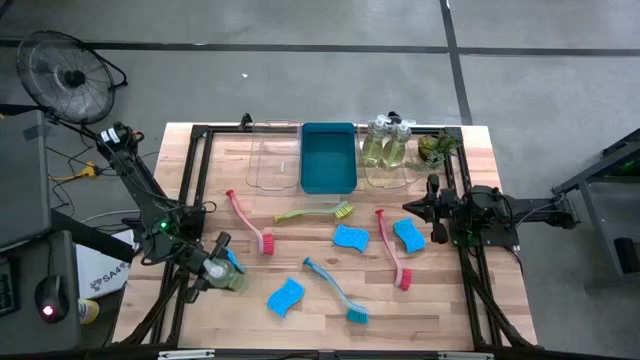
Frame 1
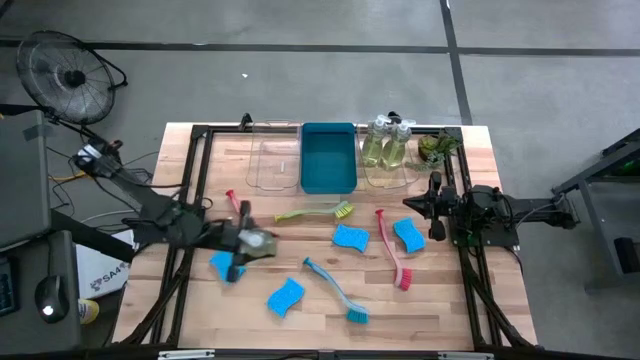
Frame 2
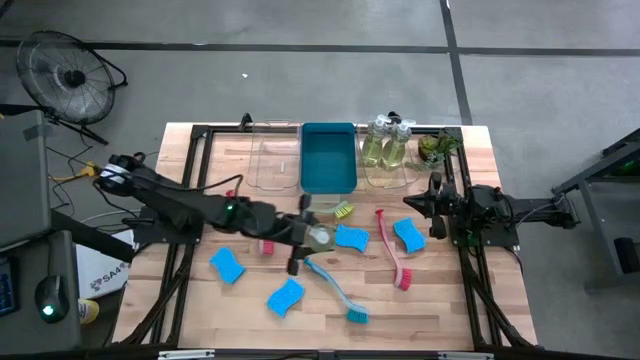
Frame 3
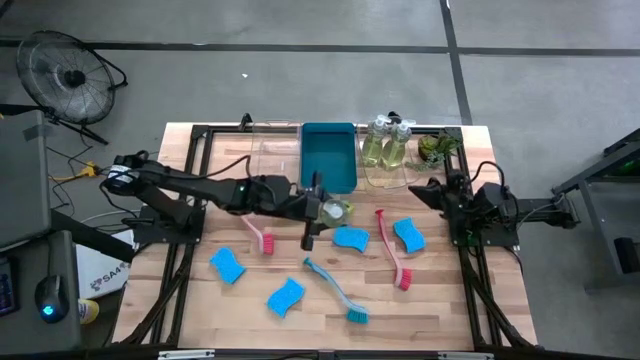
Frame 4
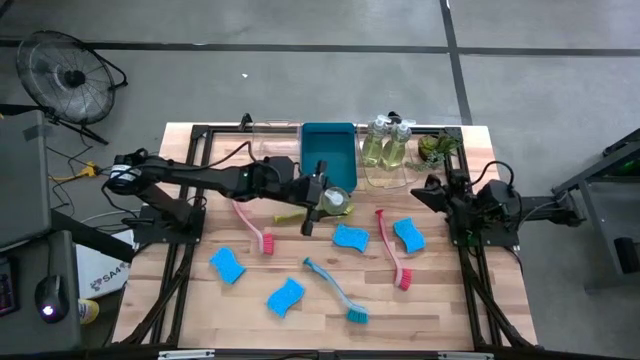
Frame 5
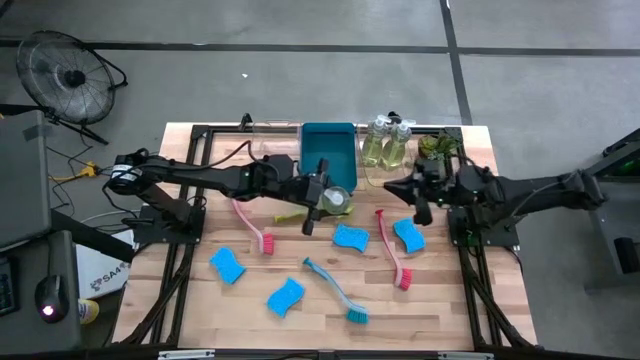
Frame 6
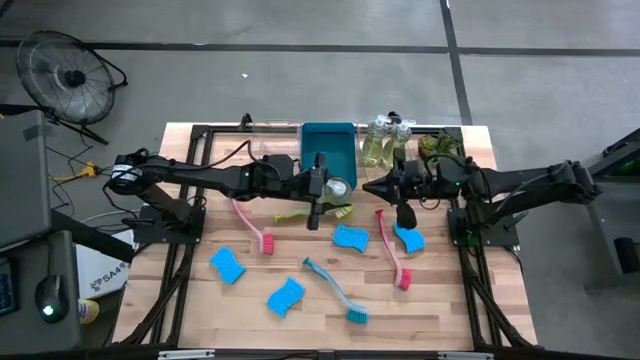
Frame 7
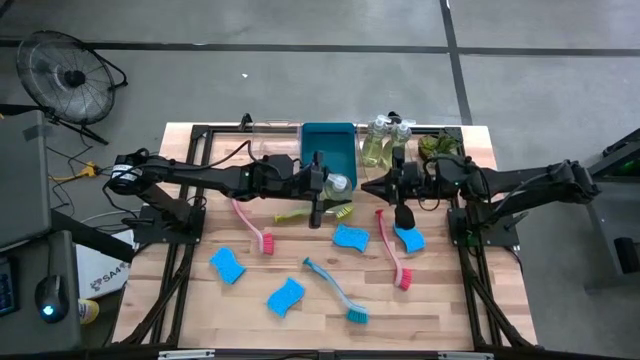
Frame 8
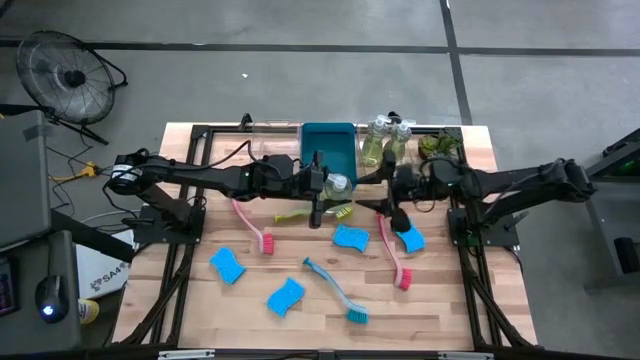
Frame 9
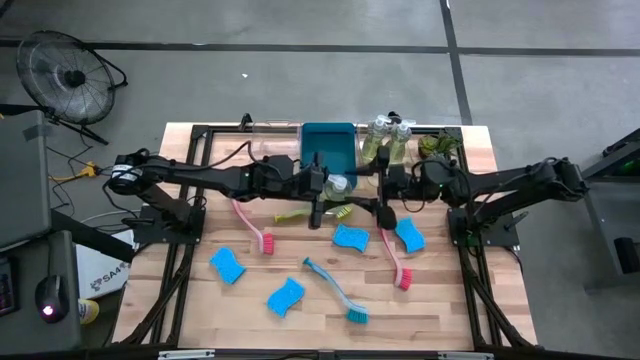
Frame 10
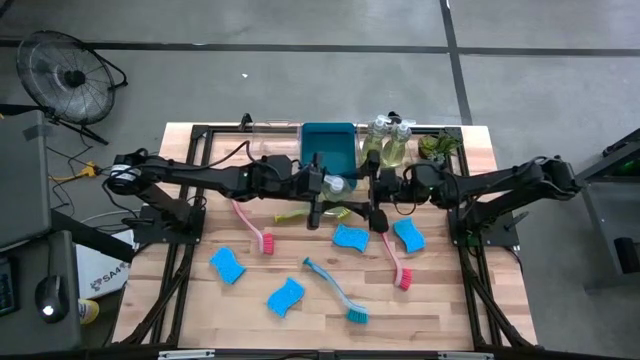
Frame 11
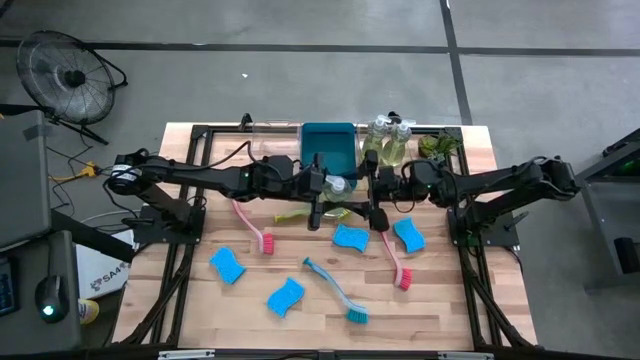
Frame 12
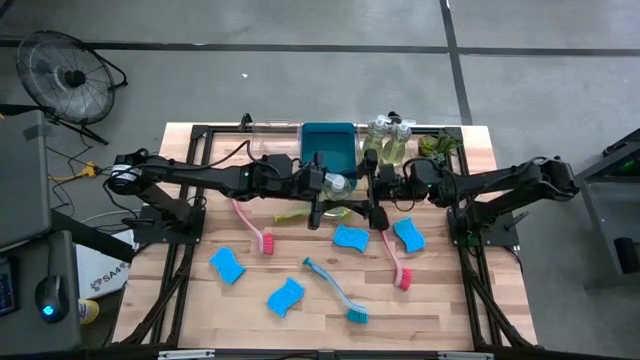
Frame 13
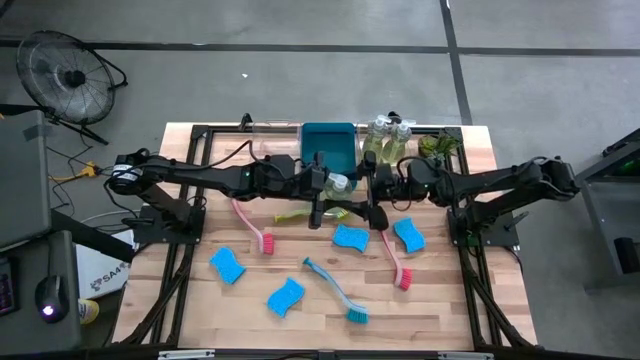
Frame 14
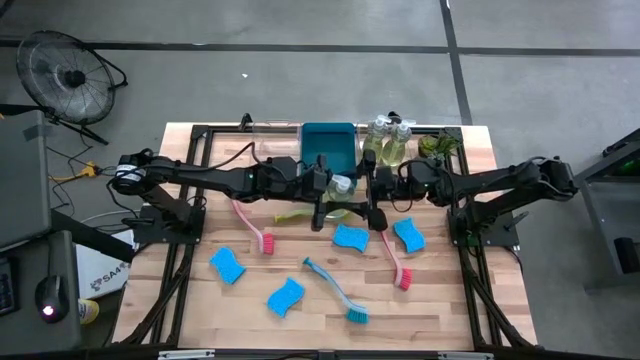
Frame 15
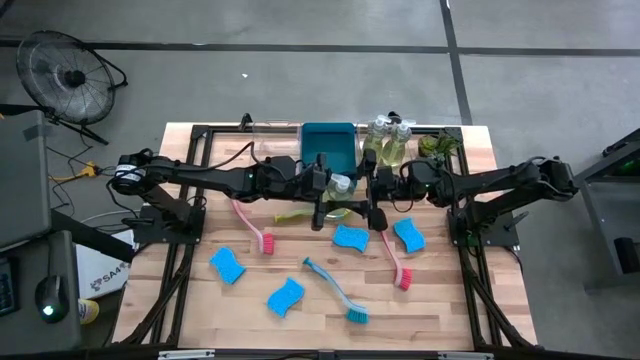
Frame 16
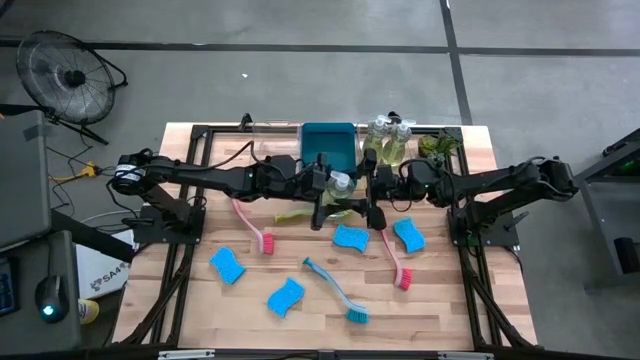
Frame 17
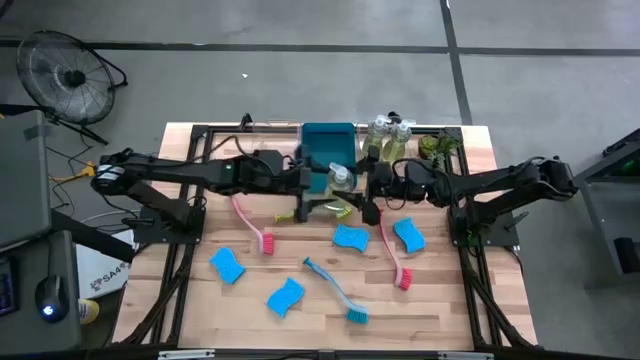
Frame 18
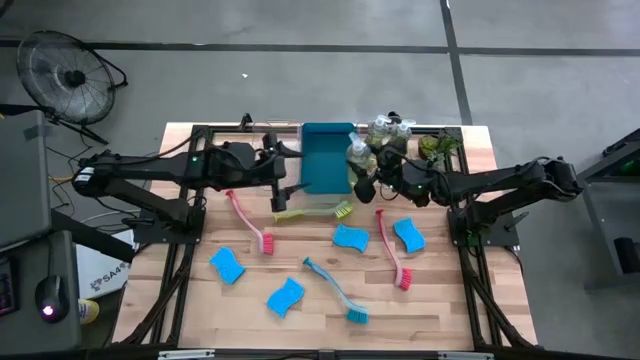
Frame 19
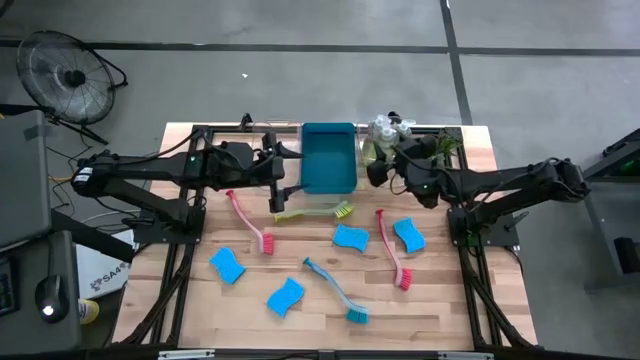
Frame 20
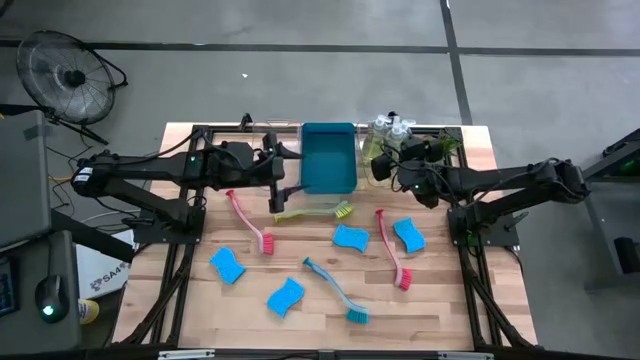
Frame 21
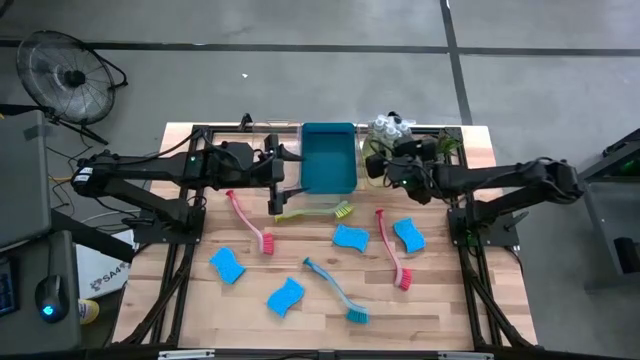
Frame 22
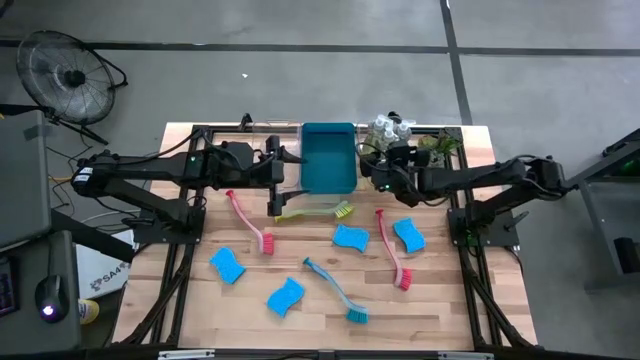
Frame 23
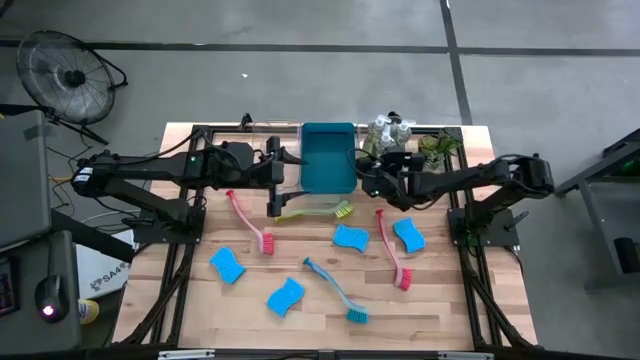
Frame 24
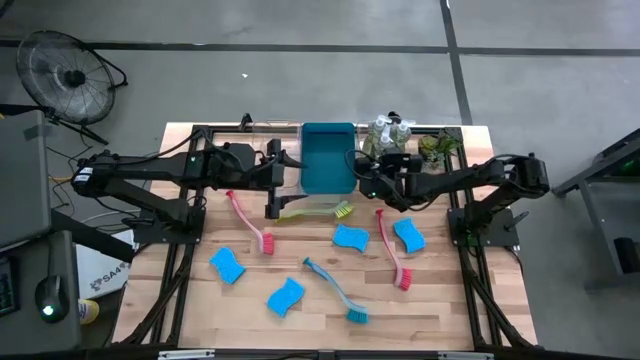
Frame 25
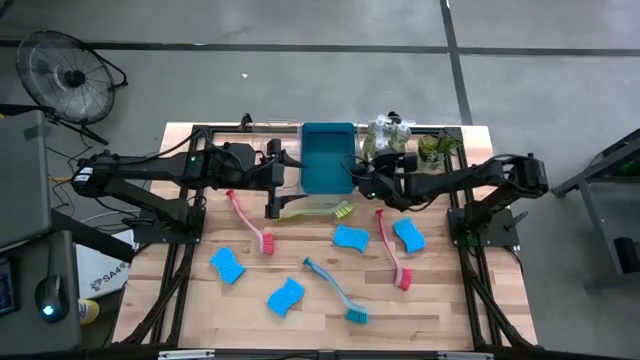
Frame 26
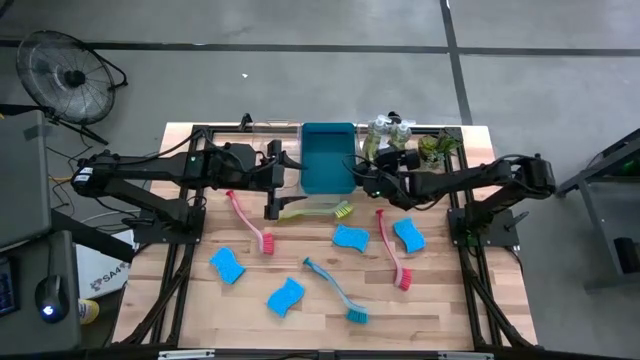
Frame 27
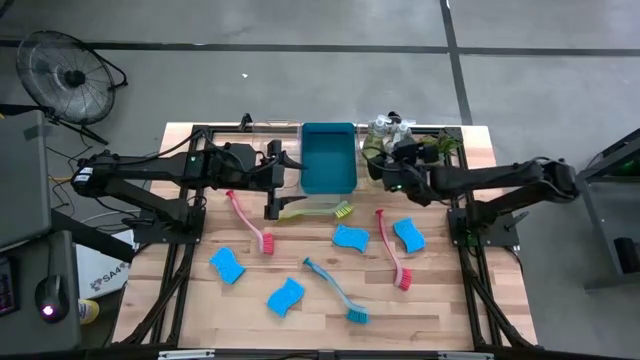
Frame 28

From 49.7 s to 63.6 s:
Task: Pick & Place Kitchen Sink Supplies
Put the green dish soap into the right transparent bin

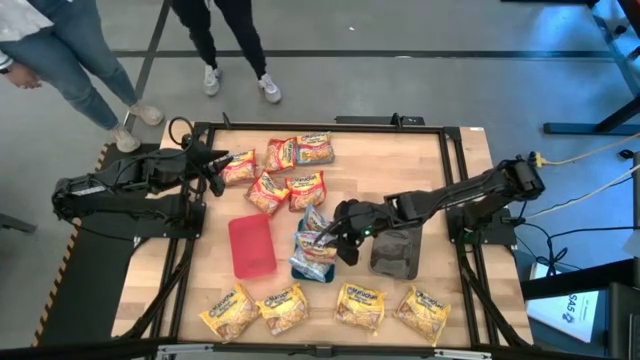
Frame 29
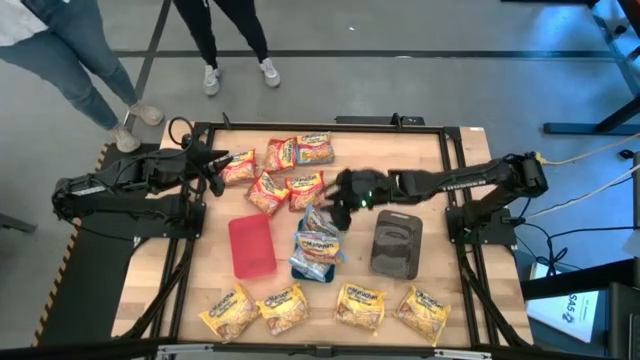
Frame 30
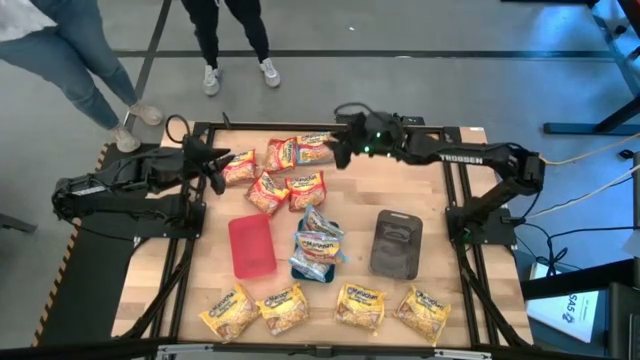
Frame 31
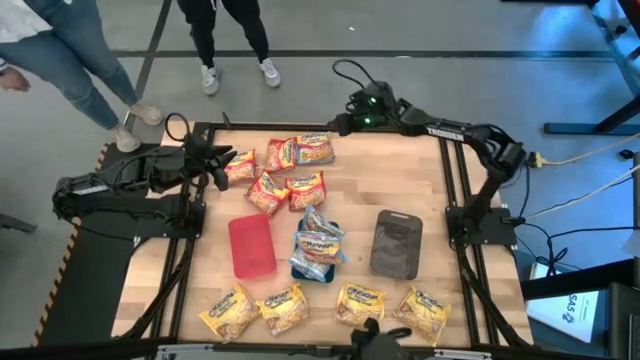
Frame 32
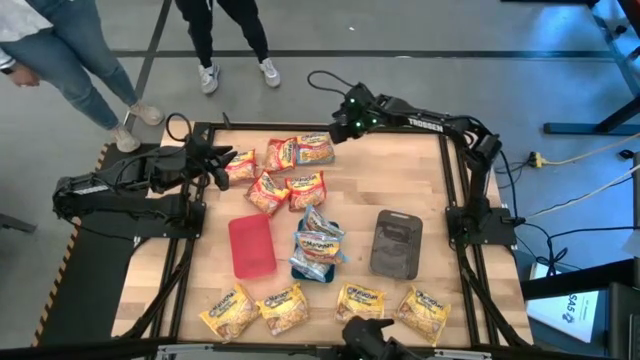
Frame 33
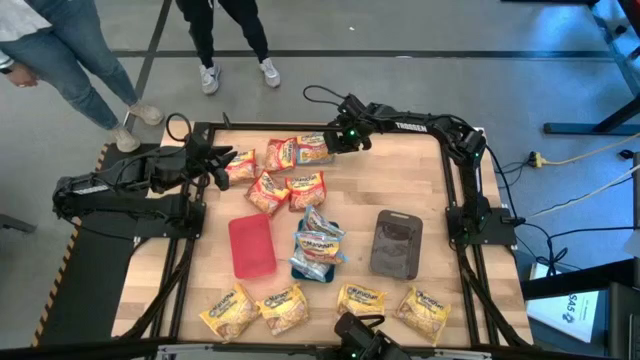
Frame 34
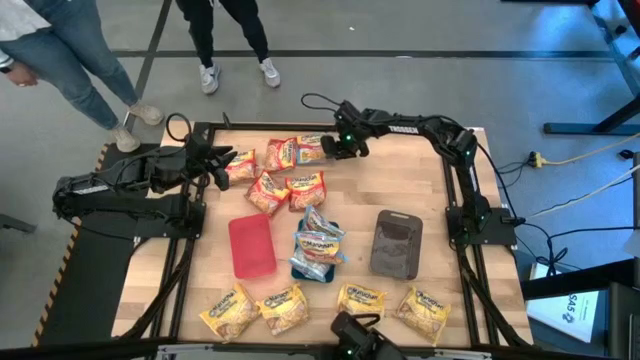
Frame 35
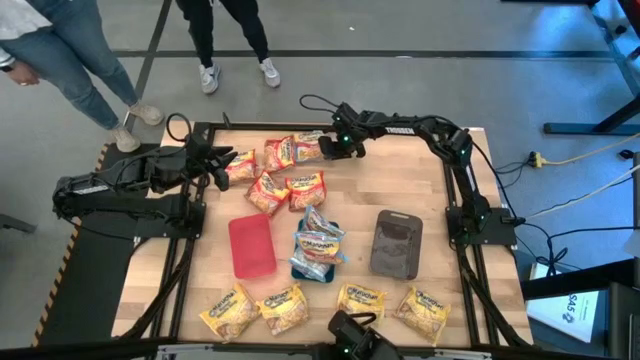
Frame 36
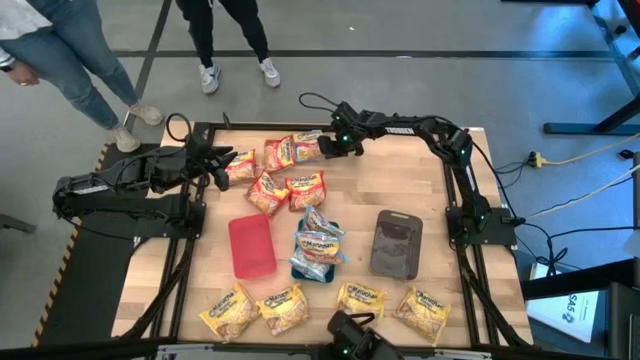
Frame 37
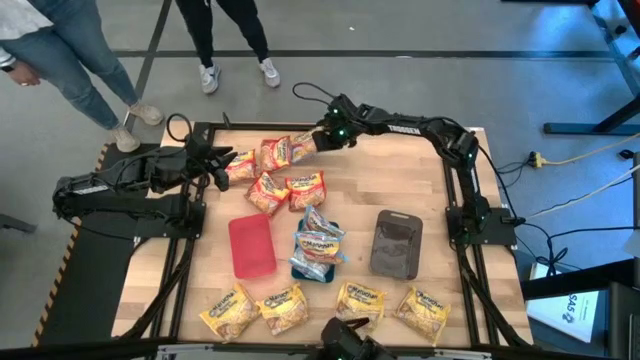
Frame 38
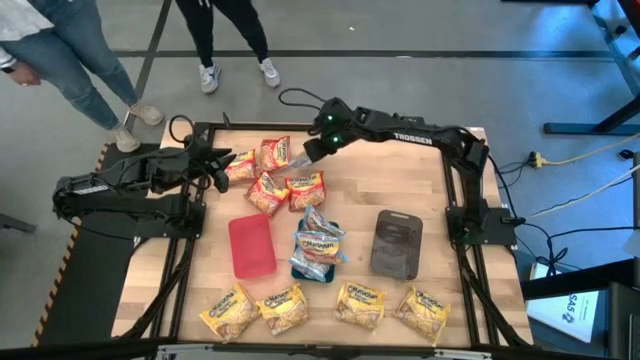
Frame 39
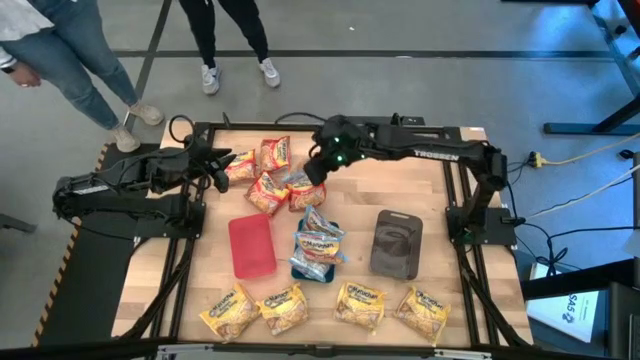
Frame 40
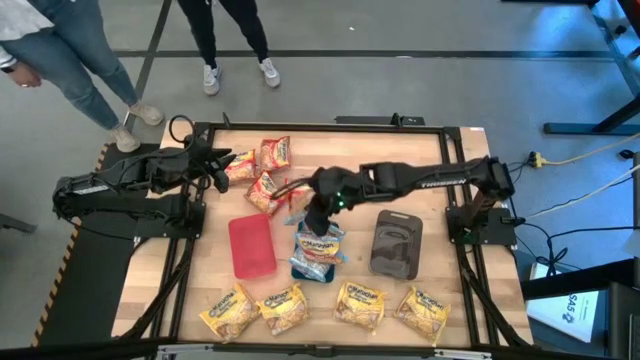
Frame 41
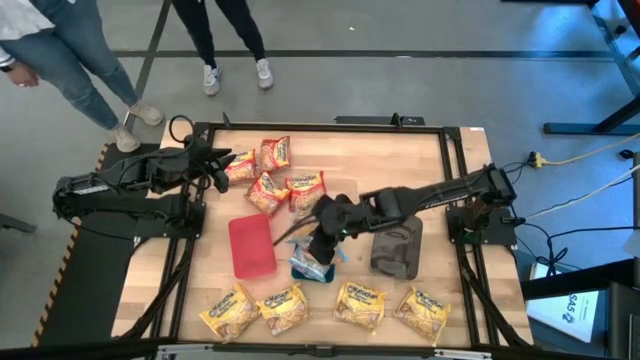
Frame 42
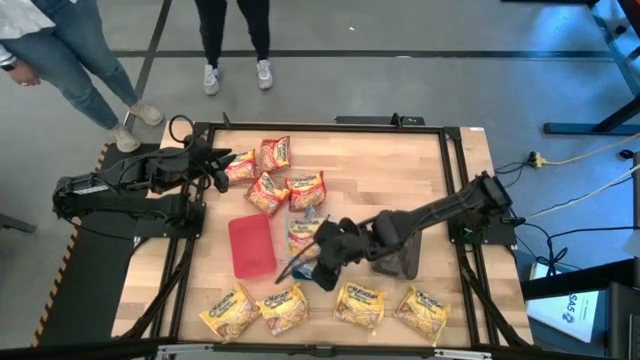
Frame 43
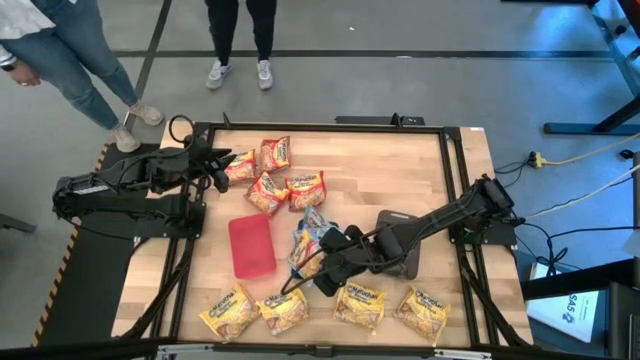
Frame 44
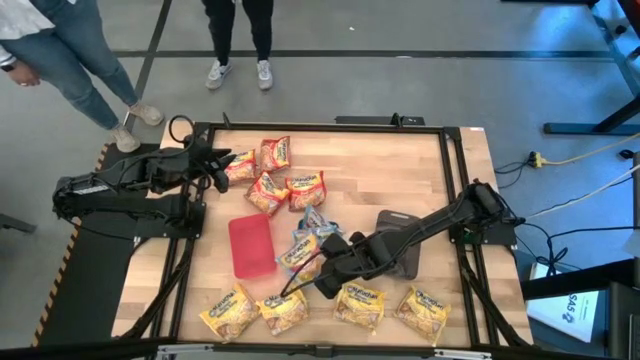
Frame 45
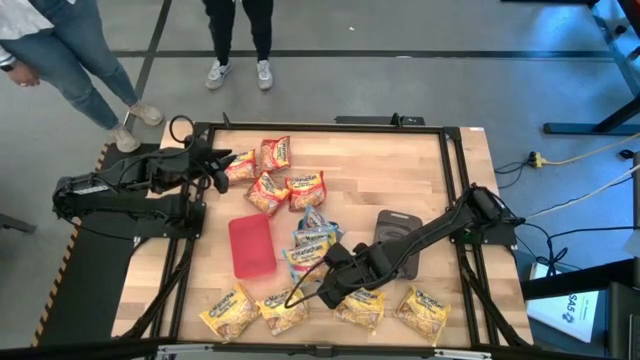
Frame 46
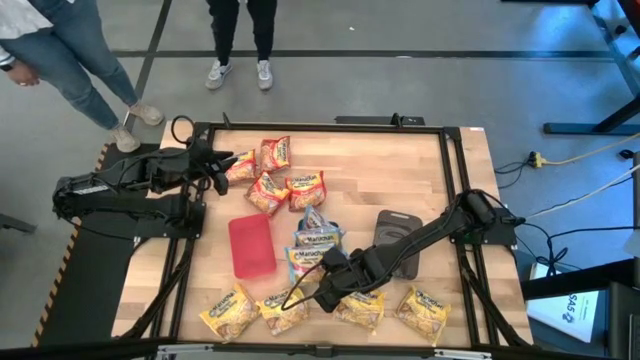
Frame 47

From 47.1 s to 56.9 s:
Task: Sort Maruchan noodles
Put the blue noodle pack into the blue bin
